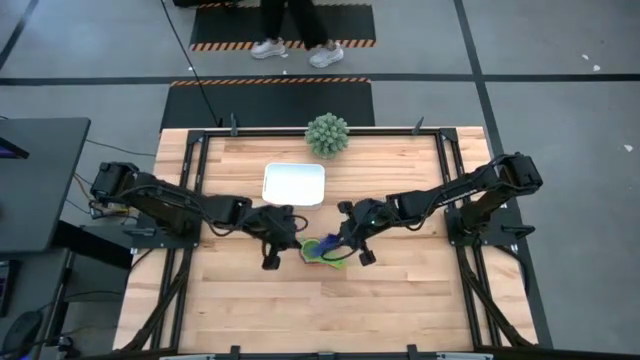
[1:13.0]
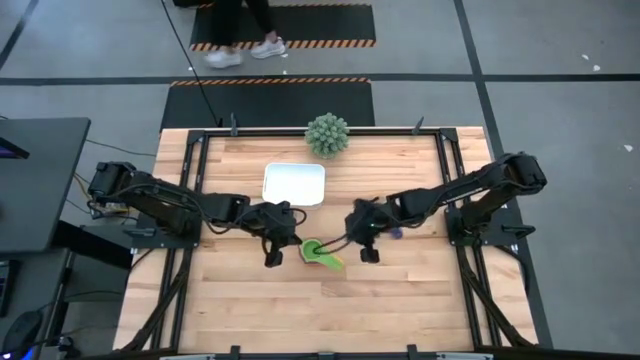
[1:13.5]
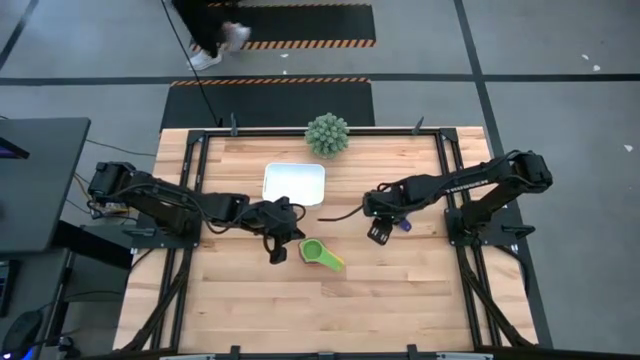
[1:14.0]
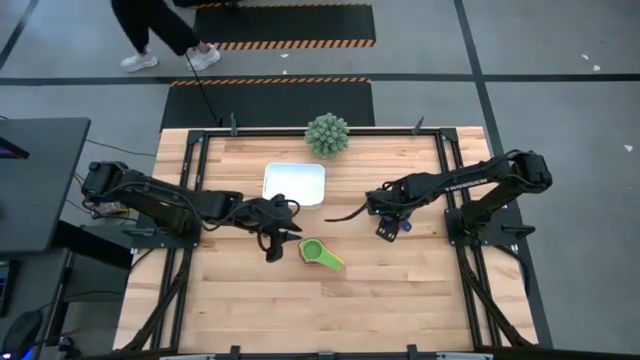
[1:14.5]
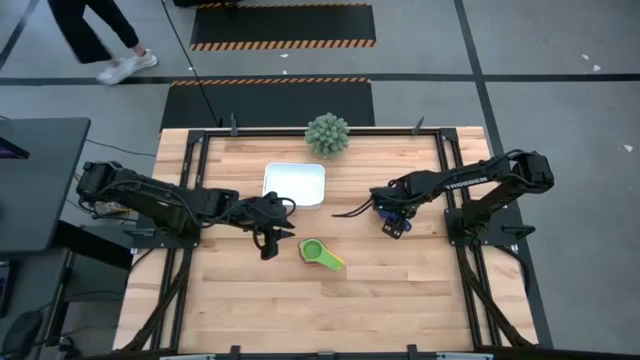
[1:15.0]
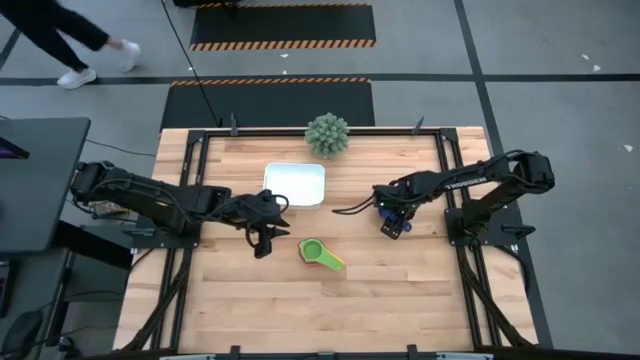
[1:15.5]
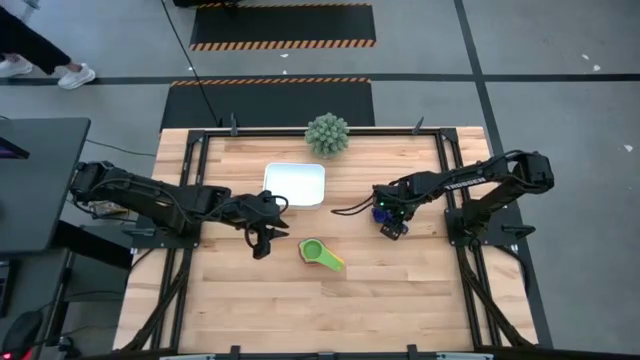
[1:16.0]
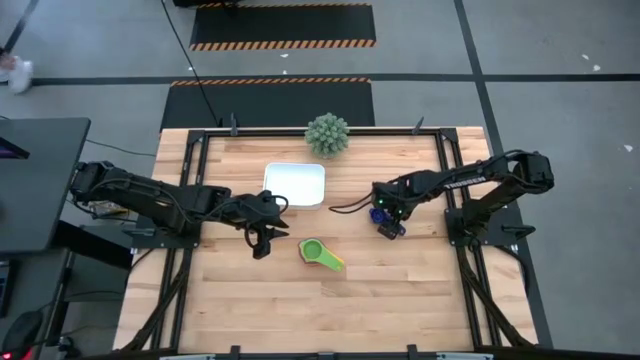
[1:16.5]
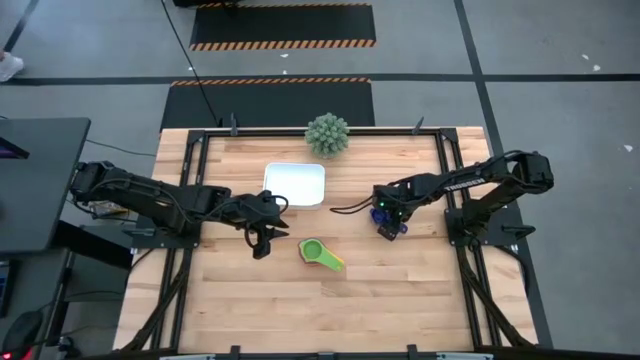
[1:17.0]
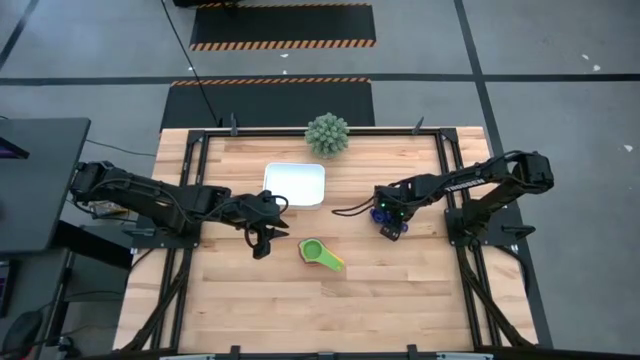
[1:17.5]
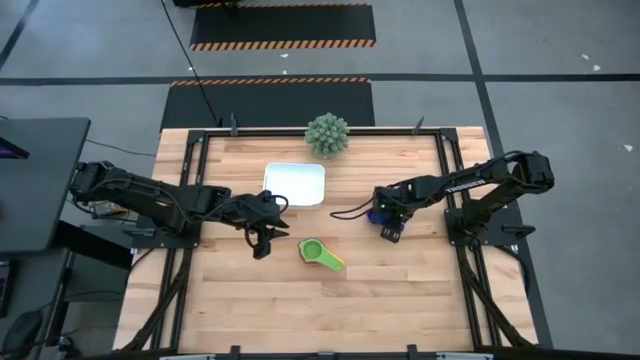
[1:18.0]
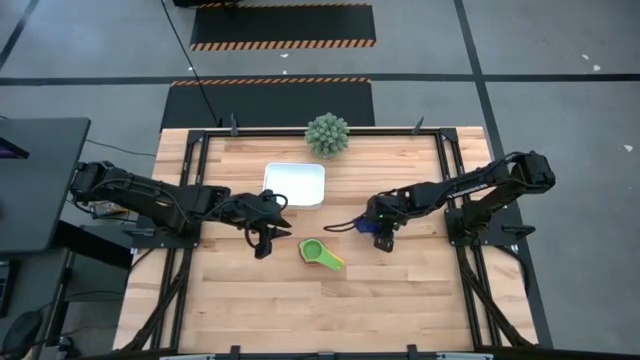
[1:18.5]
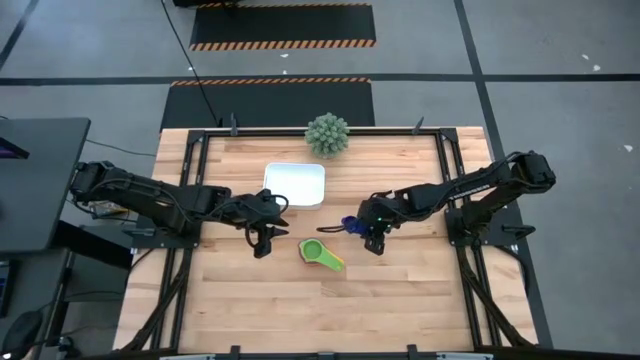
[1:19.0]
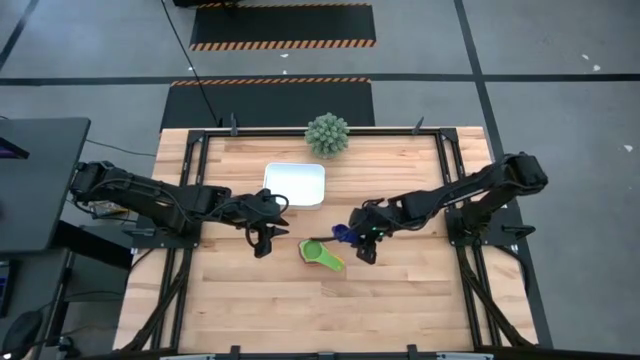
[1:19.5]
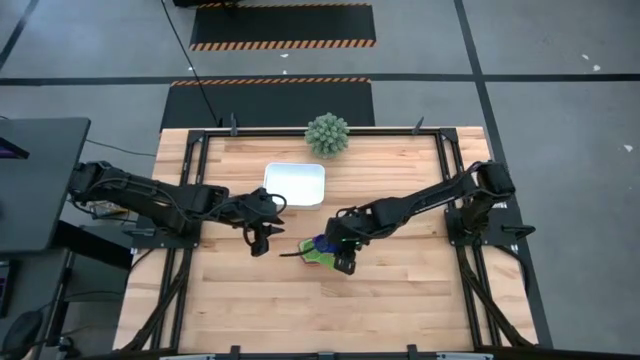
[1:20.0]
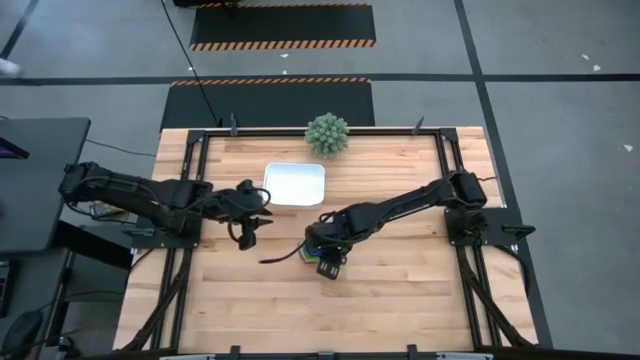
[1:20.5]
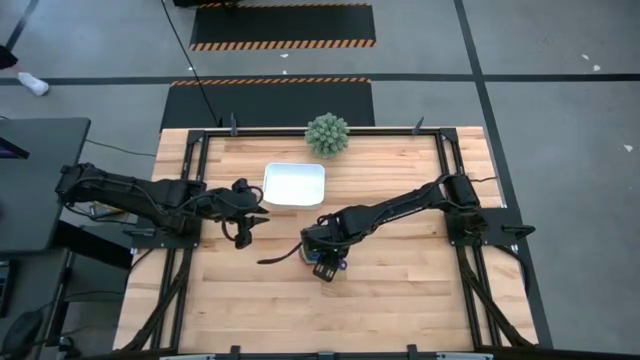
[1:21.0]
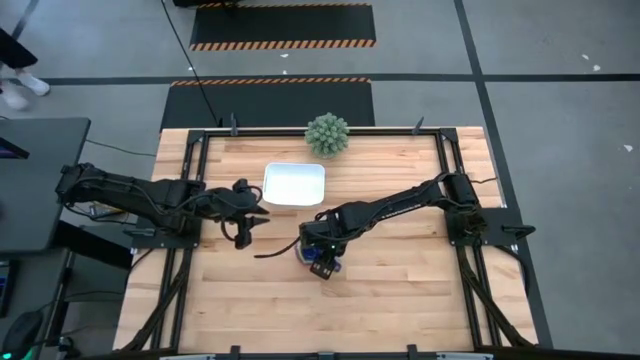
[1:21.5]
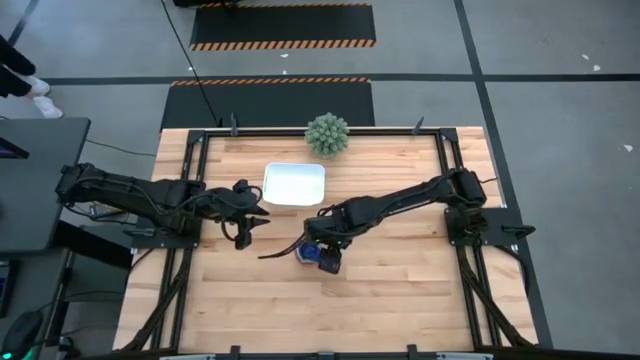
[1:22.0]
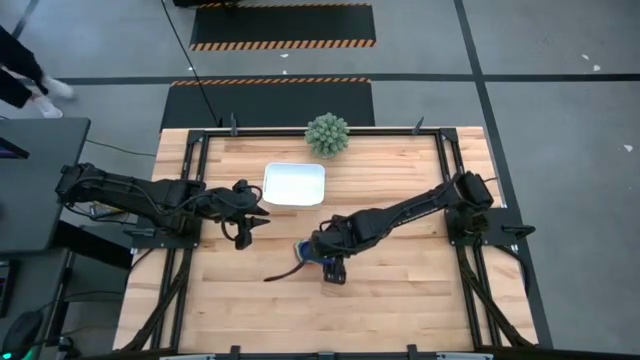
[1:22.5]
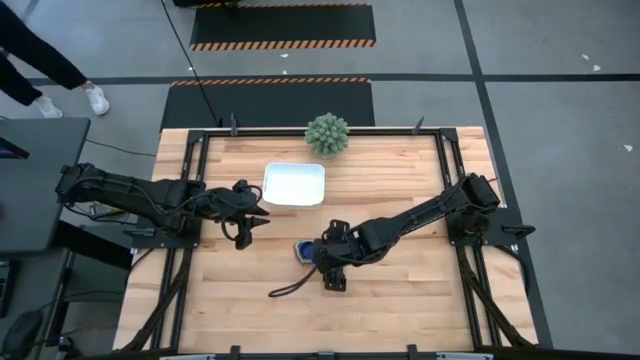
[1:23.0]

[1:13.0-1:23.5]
Task: Nest measuring cups in basket
Stack the blue measuring cup on top of the green measuring cup

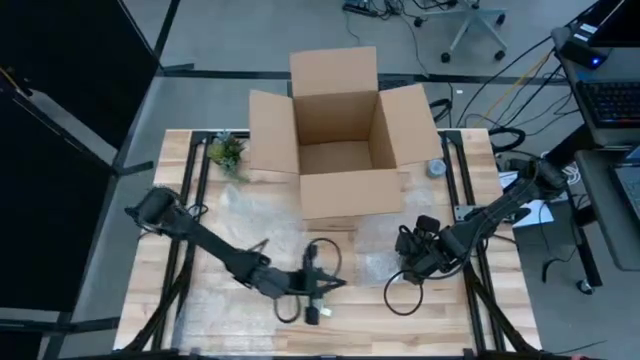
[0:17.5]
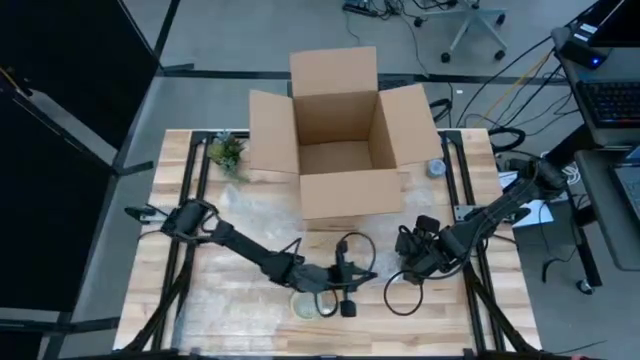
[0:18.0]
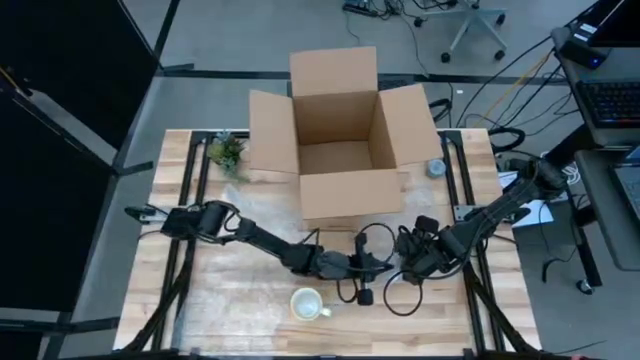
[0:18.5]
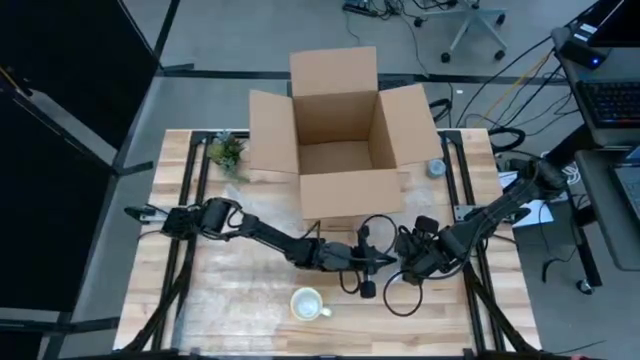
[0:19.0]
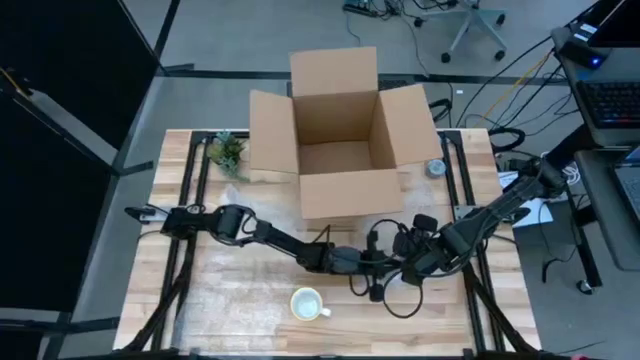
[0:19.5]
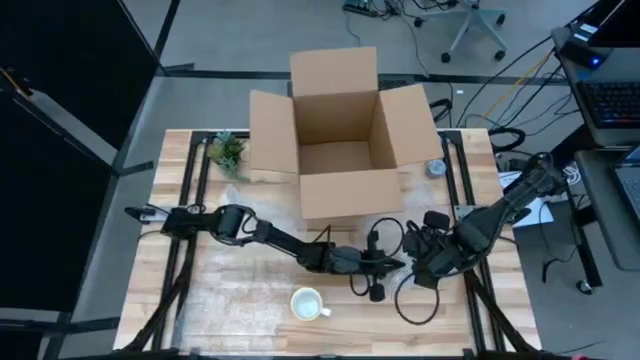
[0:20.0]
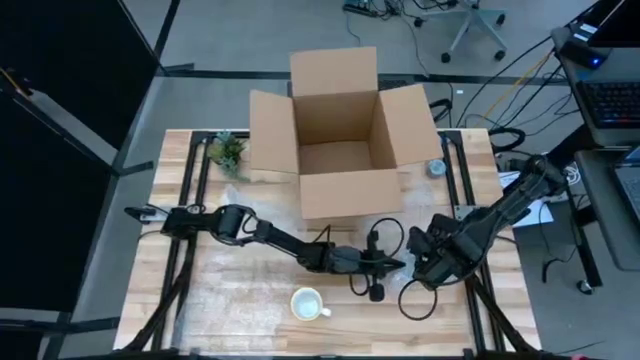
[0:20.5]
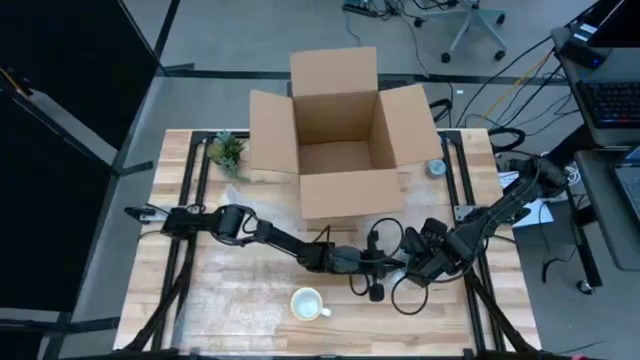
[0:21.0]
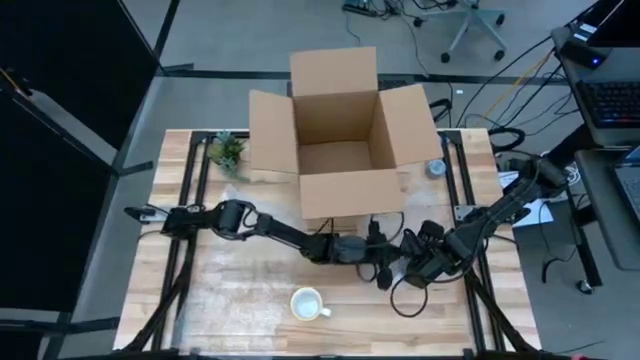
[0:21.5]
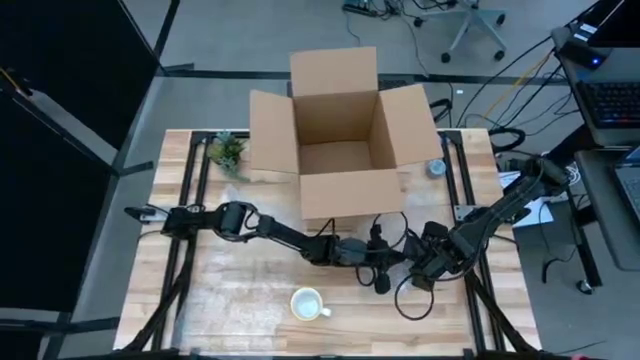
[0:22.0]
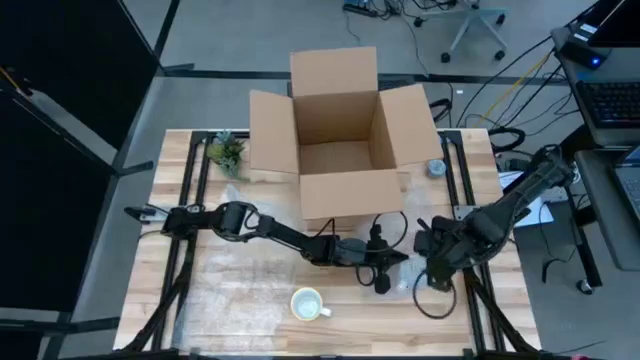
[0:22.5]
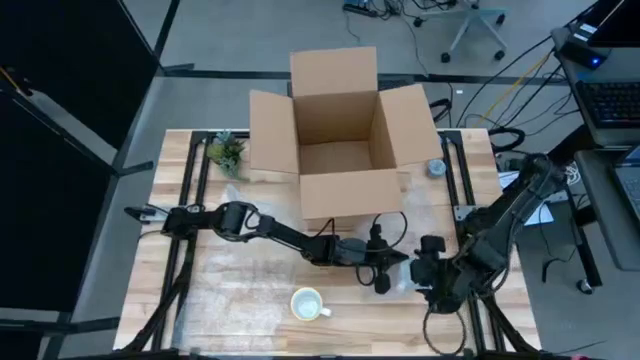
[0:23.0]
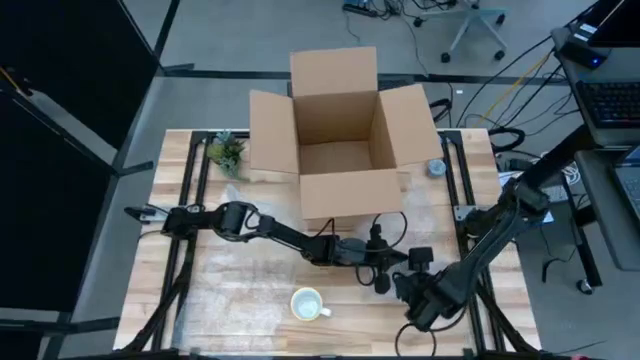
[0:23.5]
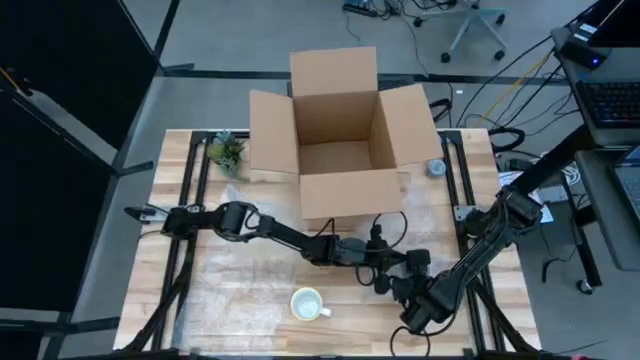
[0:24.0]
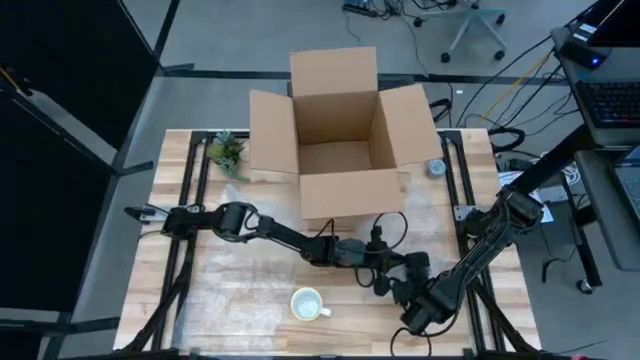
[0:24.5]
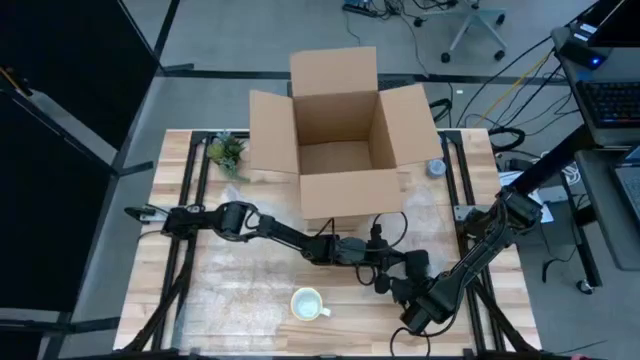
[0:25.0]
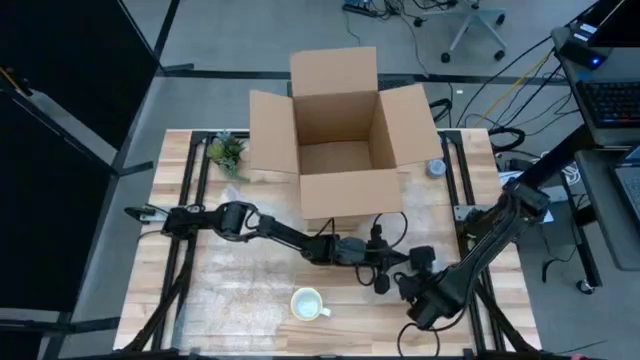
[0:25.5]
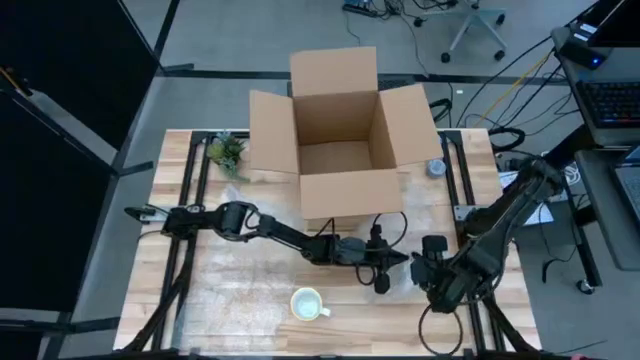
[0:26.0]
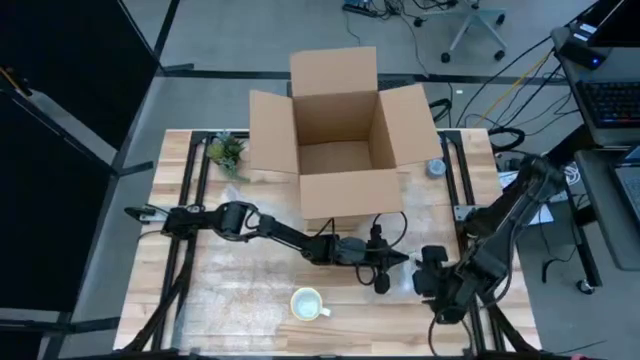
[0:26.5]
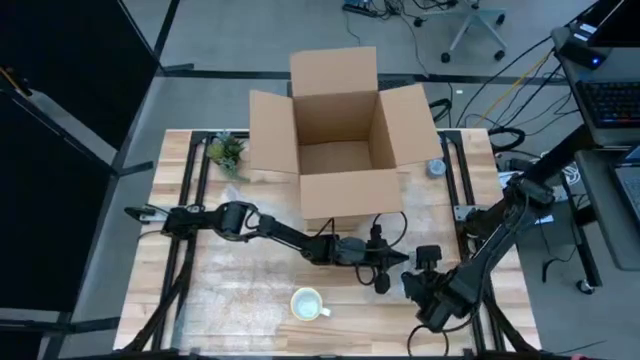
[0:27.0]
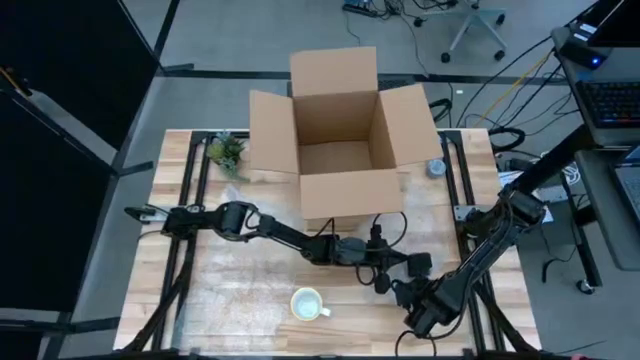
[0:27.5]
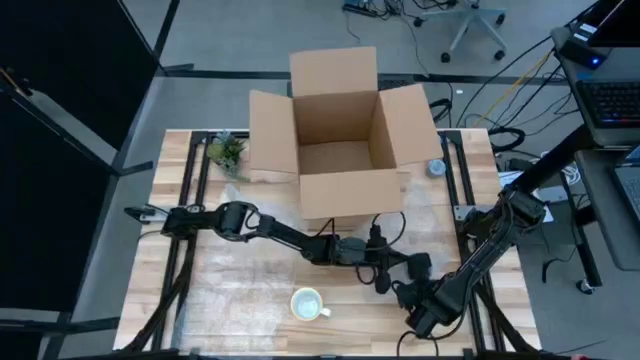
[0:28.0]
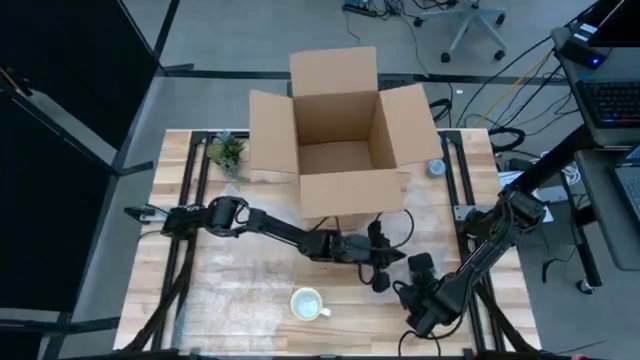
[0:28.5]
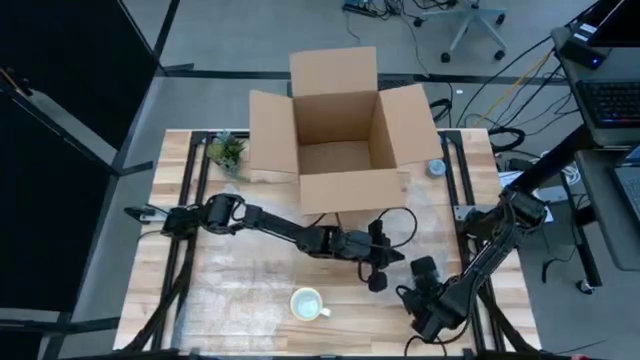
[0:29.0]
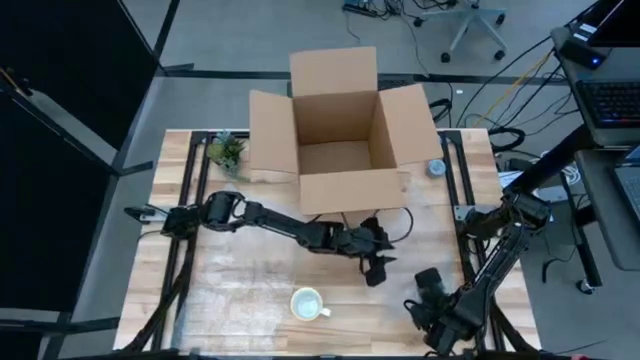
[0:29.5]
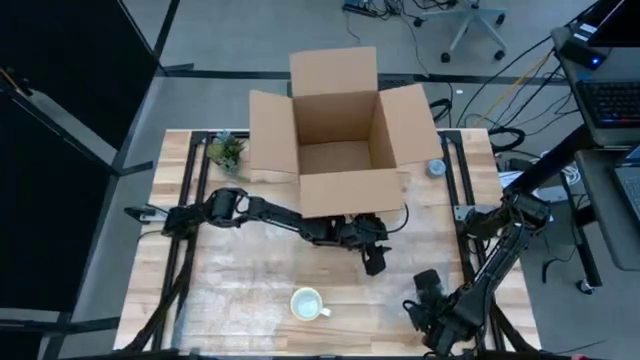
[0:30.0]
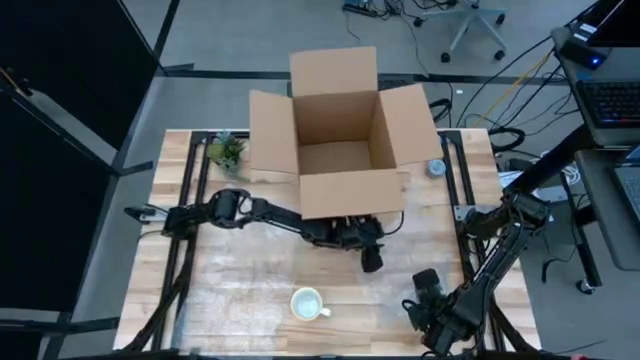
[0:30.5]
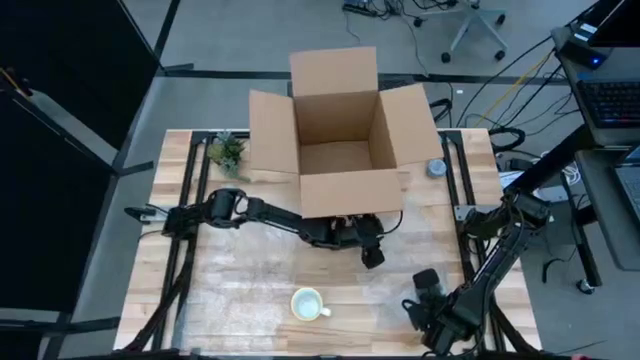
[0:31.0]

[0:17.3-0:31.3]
Task: wrap mug
Wrap the red mug with bubble wrap
